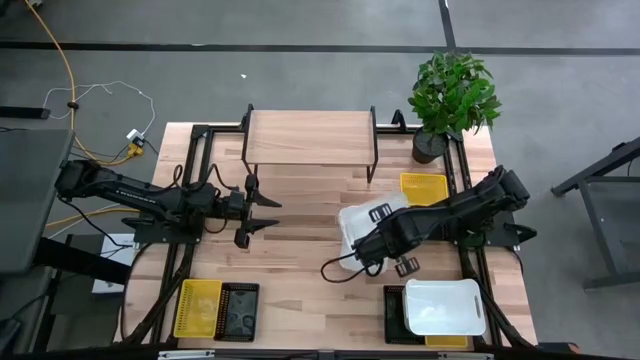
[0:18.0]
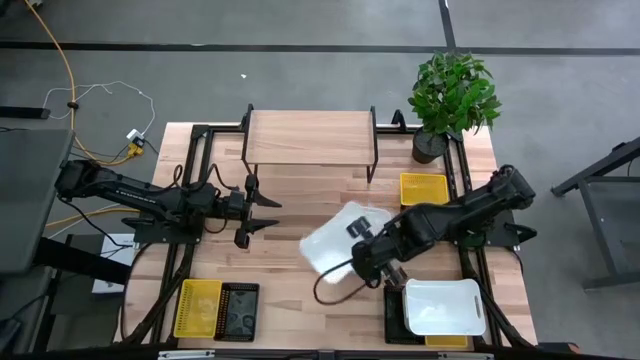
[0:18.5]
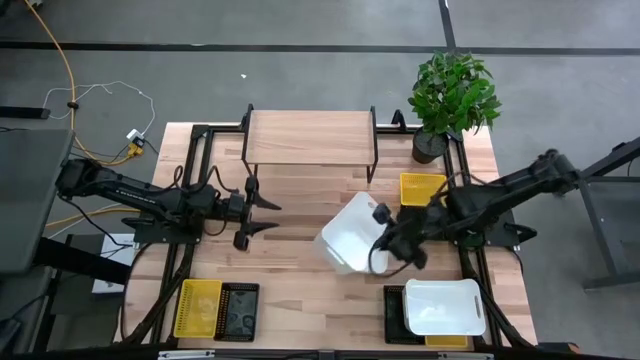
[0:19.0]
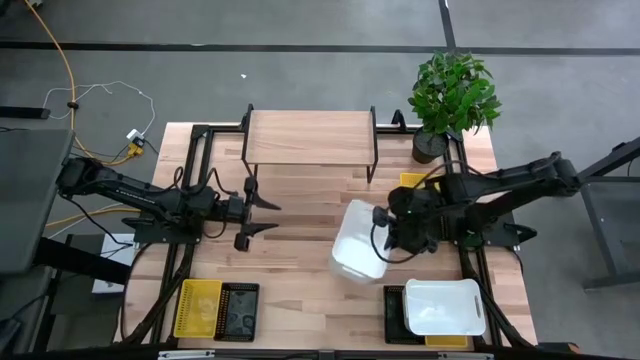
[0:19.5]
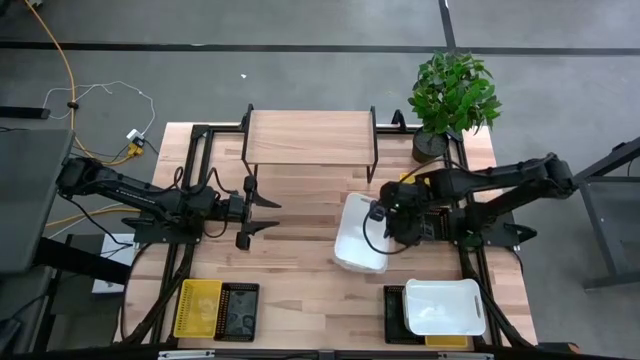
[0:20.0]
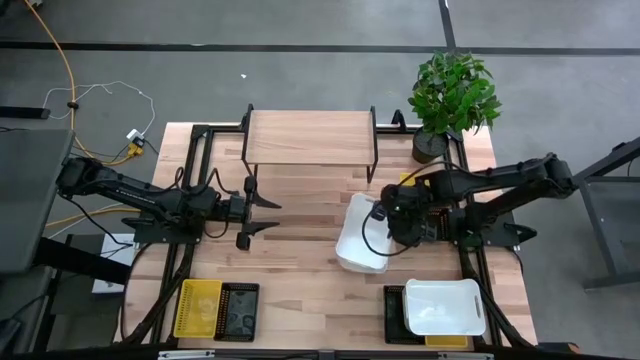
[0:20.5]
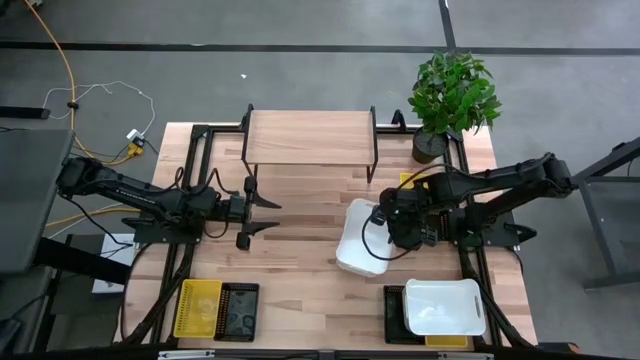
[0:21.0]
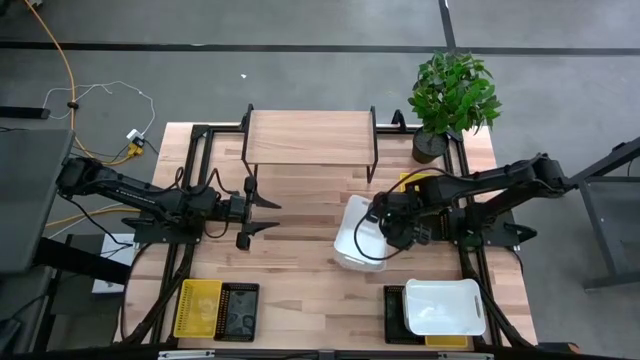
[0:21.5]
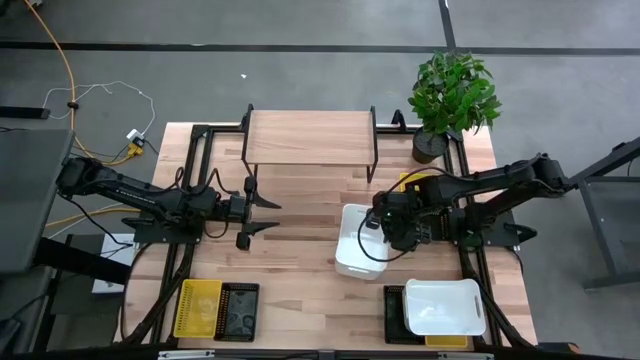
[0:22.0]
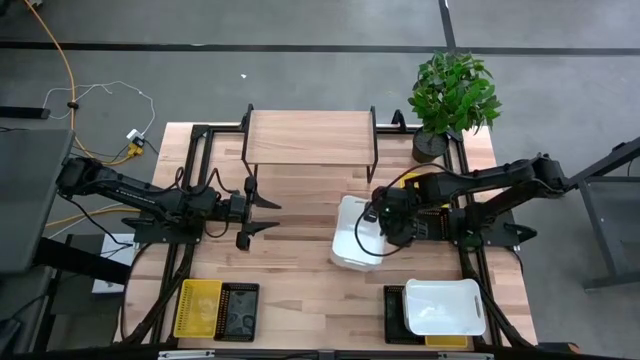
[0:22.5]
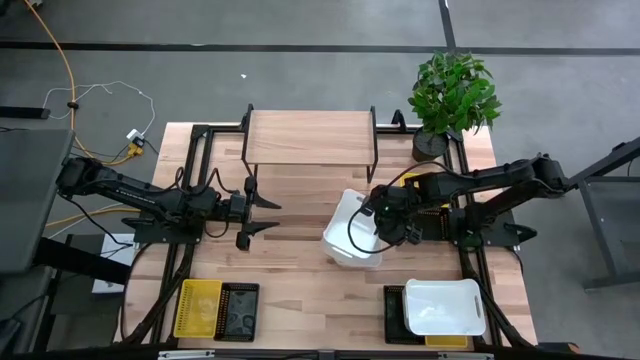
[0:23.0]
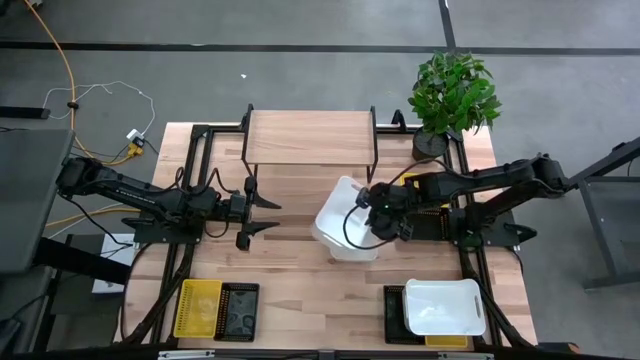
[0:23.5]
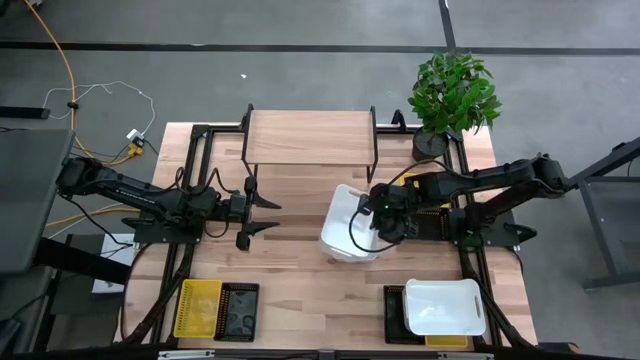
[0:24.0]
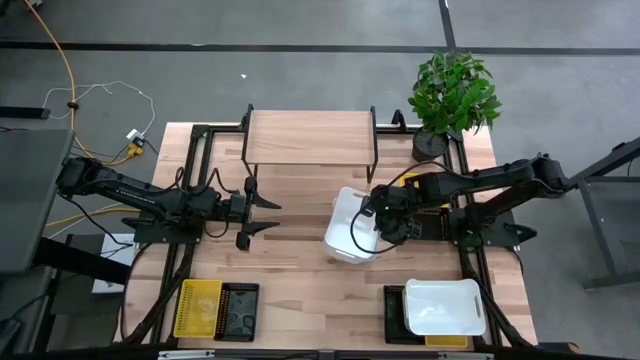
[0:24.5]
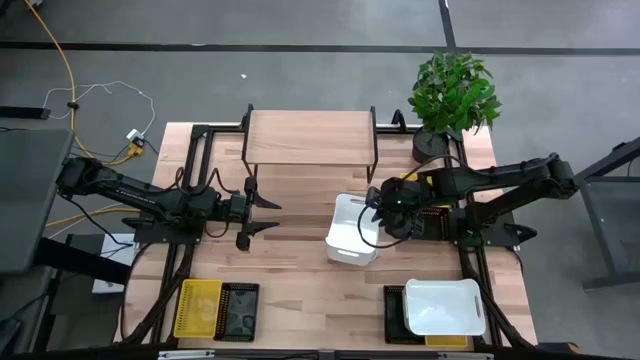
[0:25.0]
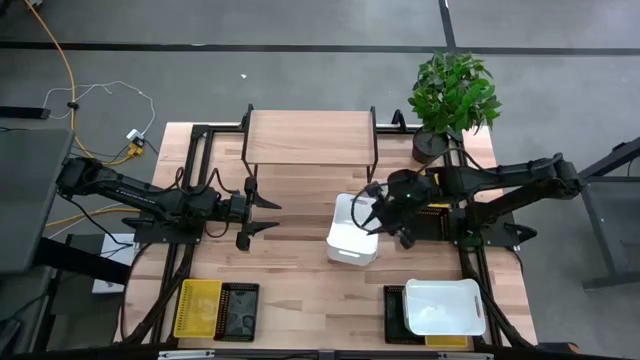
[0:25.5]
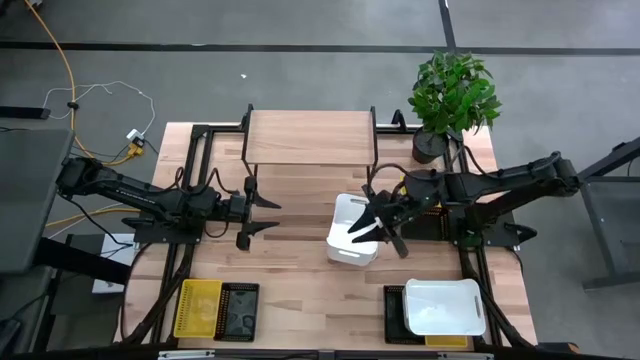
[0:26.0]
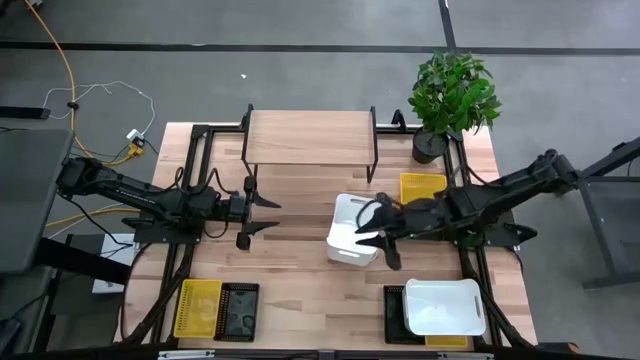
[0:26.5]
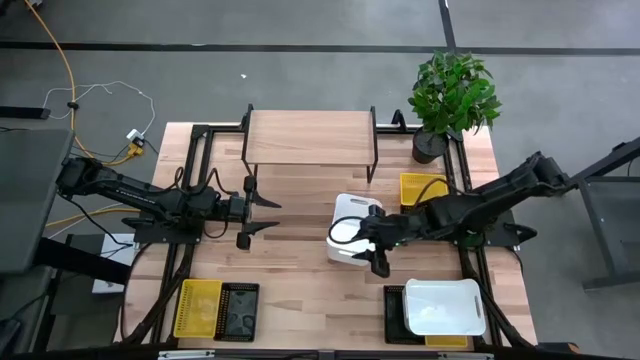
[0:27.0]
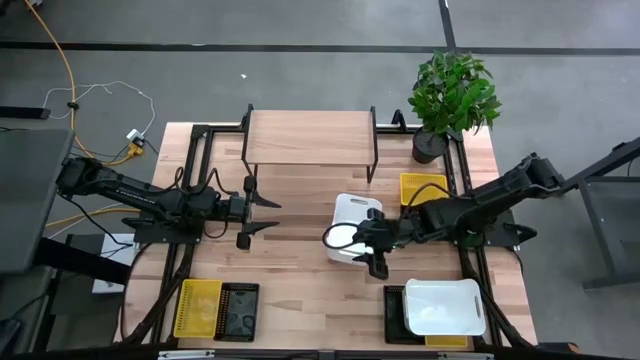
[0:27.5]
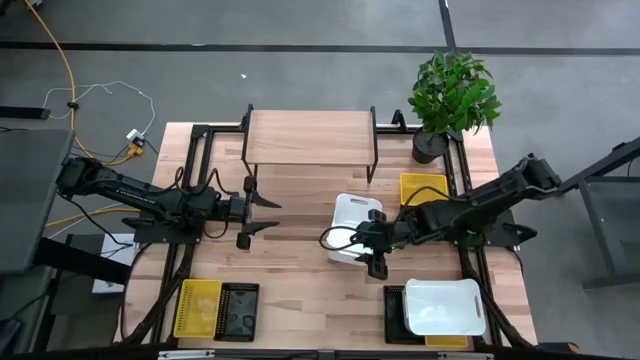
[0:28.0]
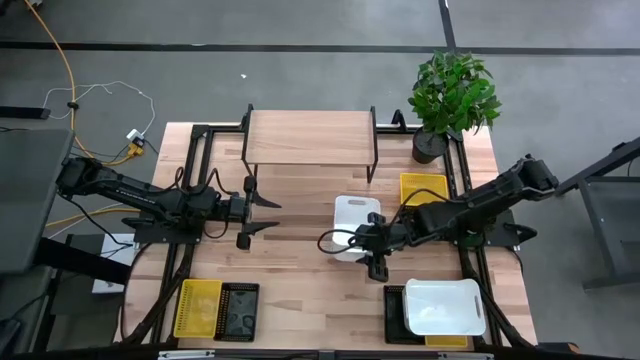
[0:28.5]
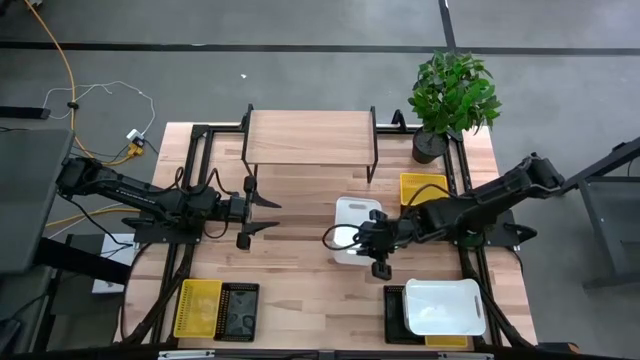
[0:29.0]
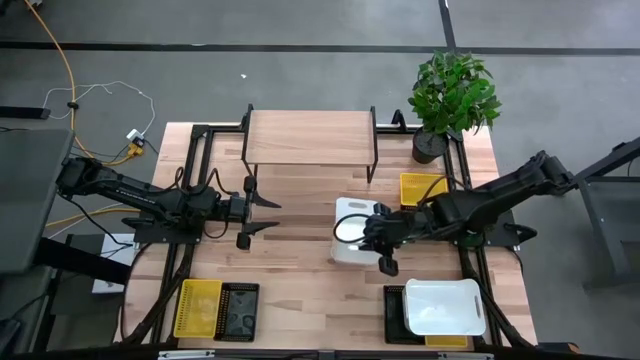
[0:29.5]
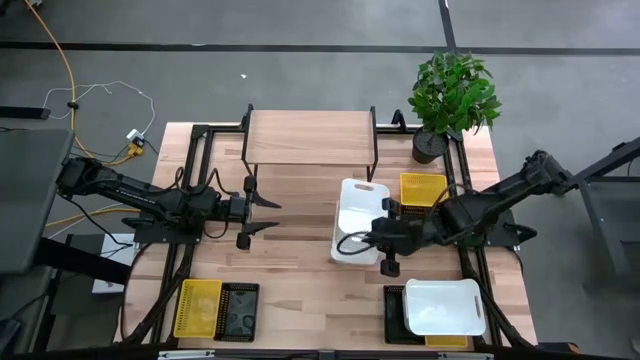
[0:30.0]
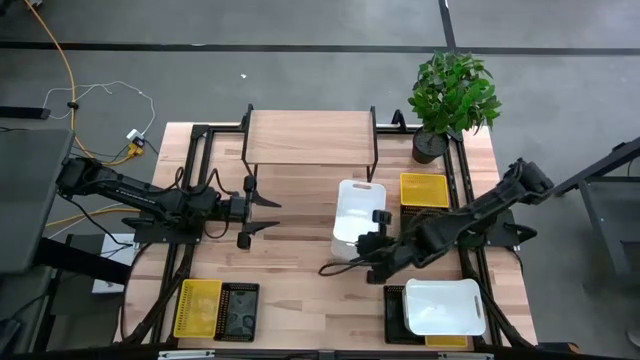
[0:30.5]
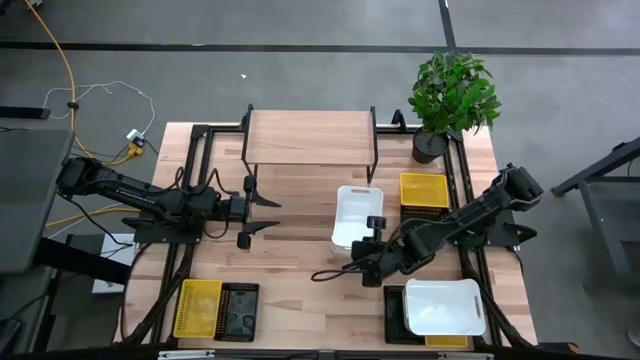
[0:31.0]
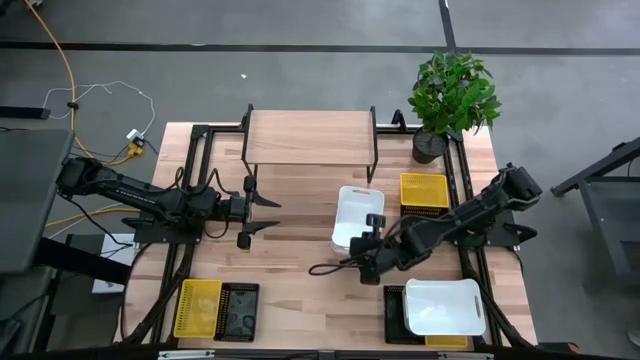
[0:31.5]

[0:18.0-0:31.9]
Task: Stack baskets on shelf by color
Stack the top left white bin on the top right white bin

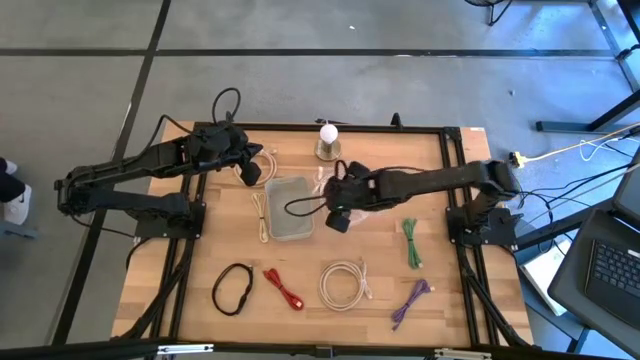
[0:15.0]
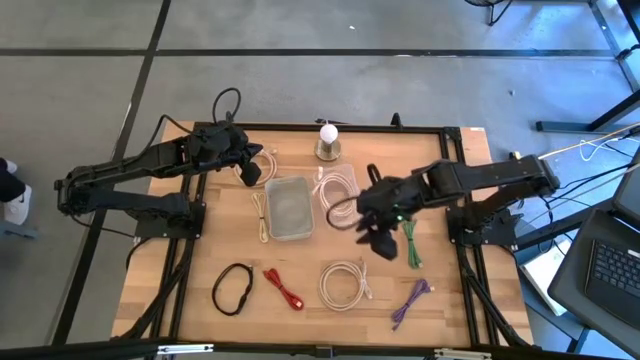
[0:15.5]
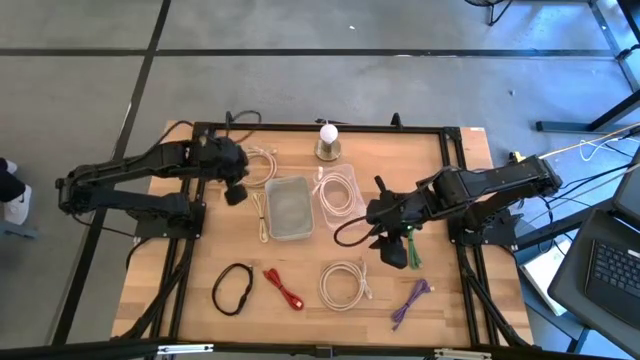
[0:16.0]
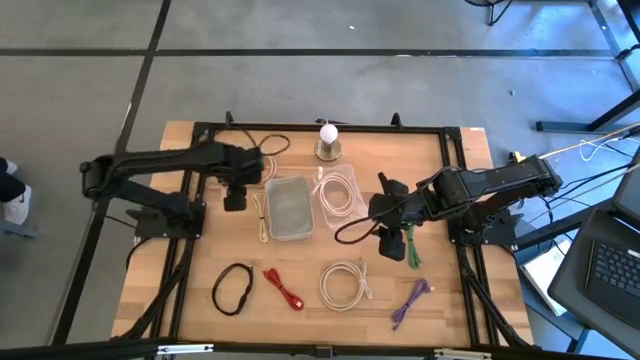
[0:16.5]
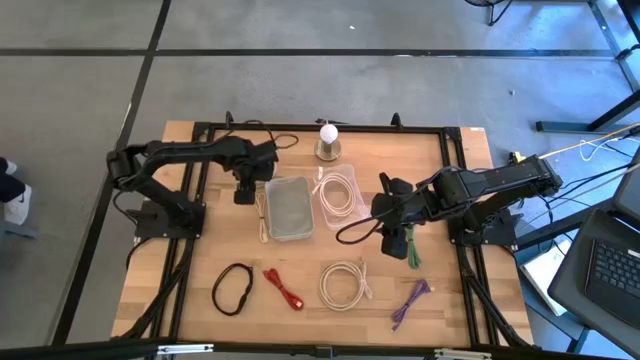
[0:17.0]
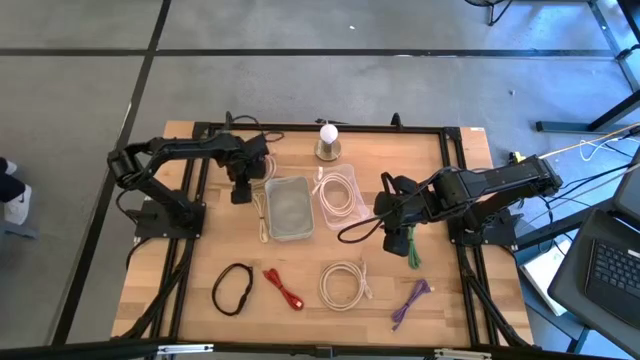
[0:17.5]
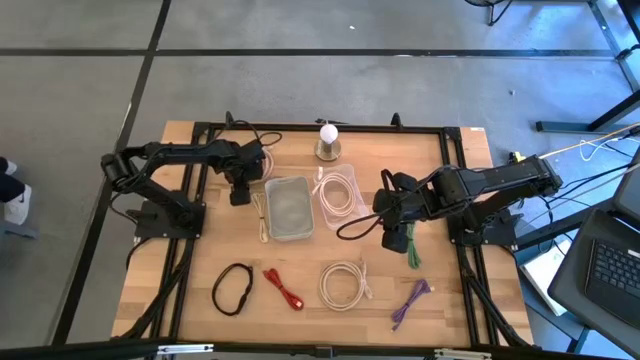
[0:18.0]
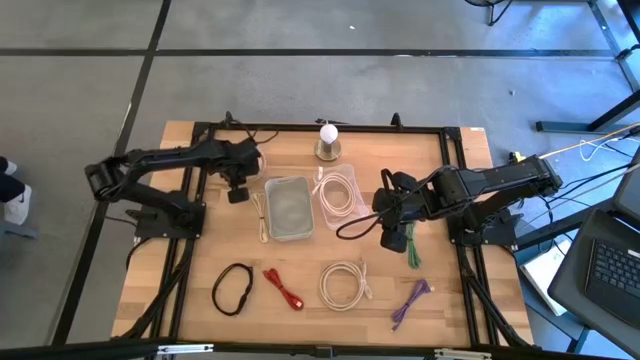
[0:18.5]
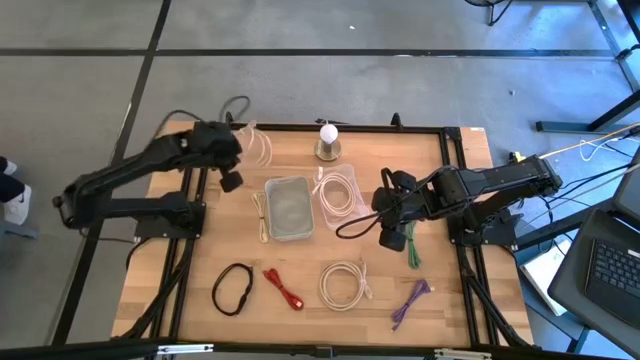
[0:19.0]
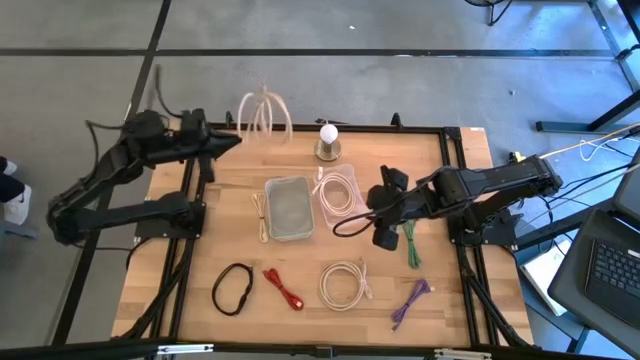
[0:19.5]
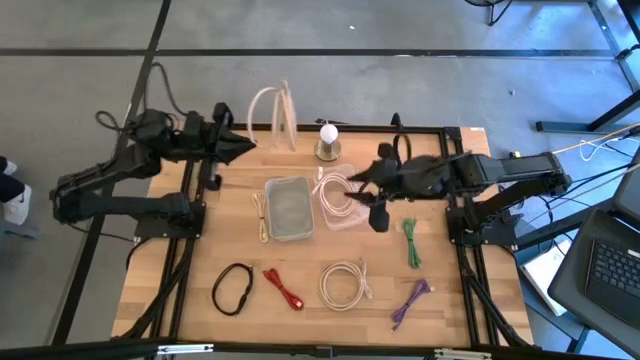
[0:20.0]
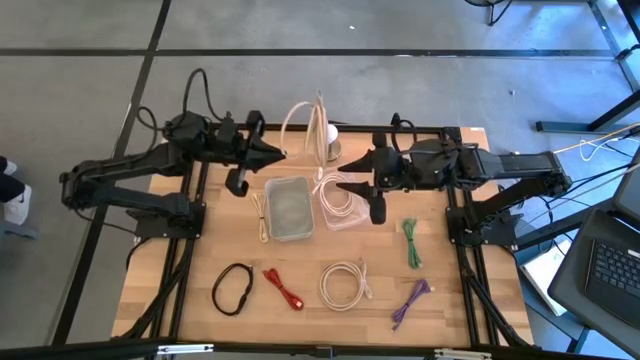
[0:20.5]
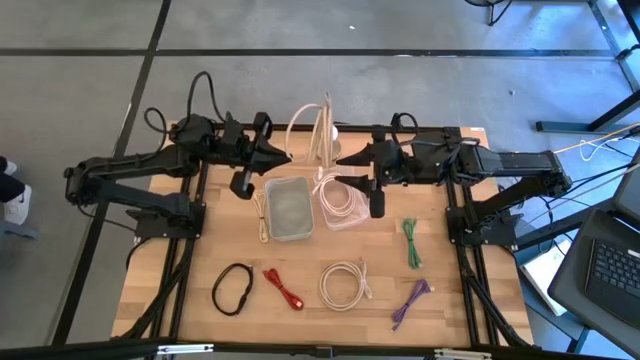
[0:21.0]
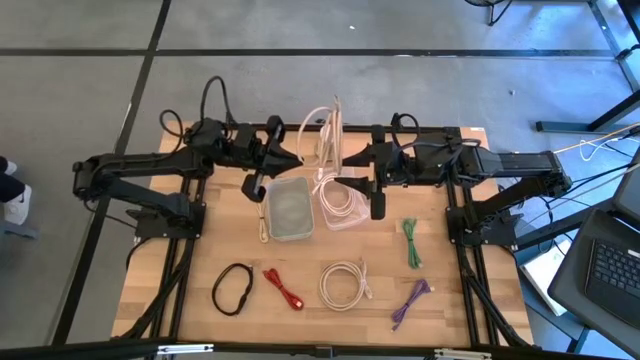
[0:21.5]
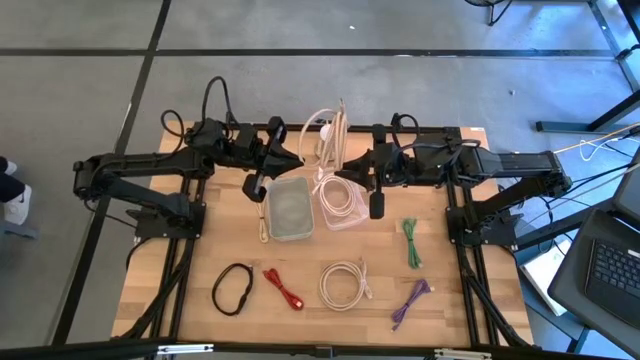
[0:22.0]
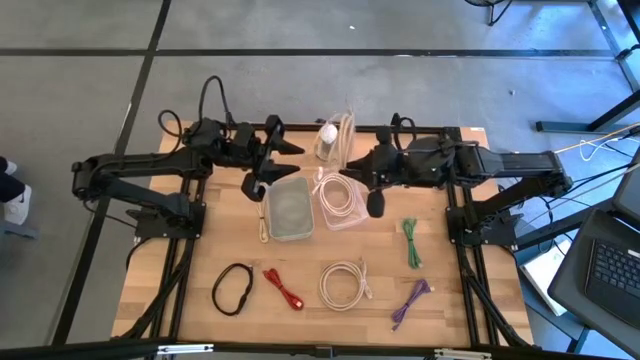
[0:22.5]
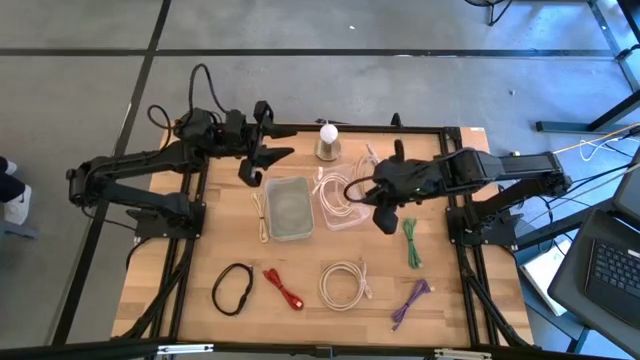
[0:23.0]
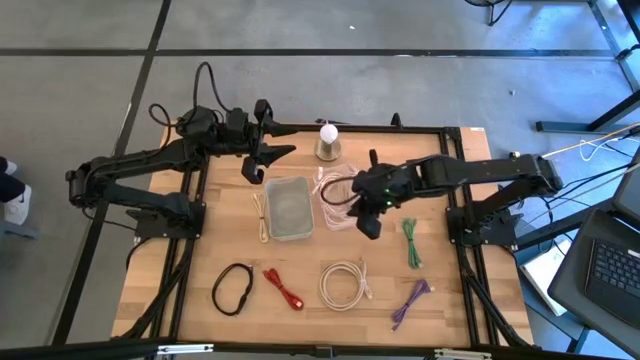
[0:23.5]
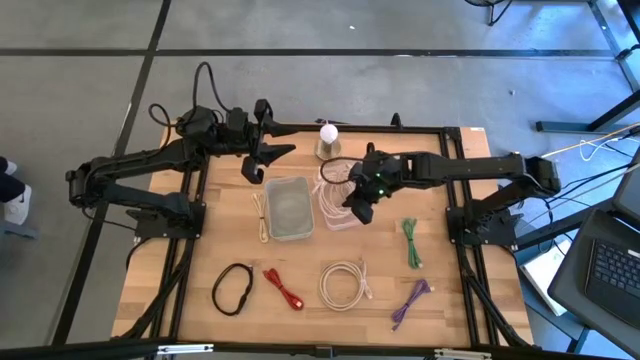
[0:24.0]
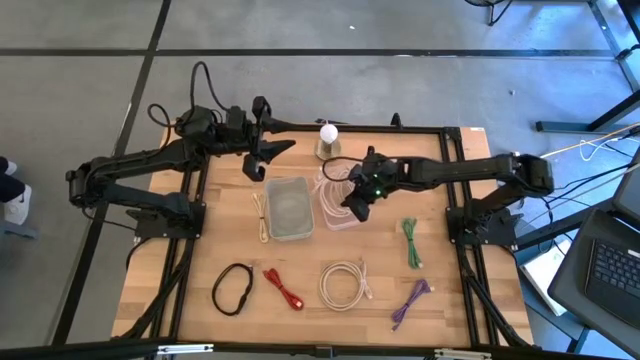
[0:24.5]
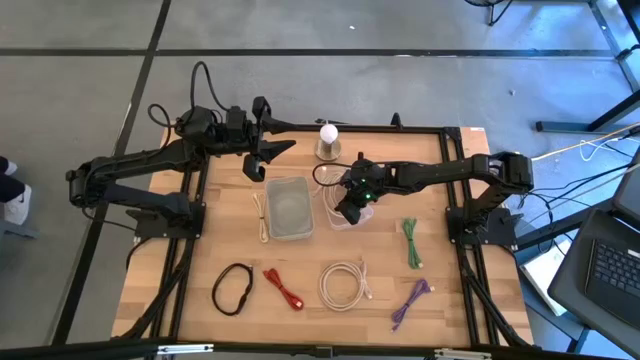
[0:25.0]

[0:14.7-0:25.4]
Task: Pick and place USB-C Cables
Put the top white usb cable into the transparent bin
